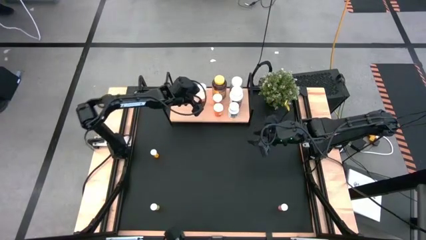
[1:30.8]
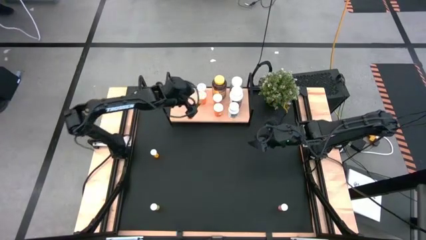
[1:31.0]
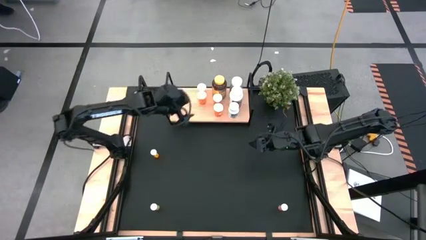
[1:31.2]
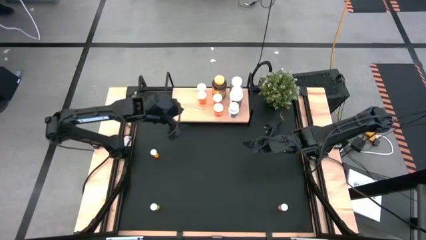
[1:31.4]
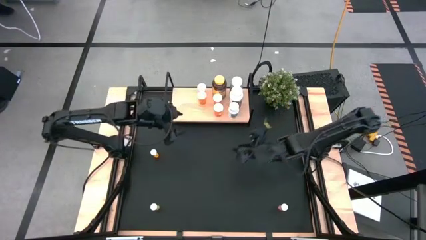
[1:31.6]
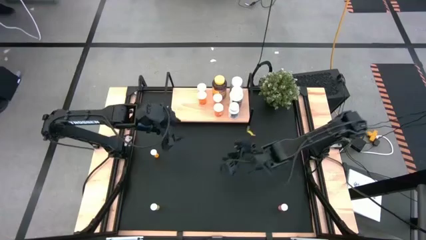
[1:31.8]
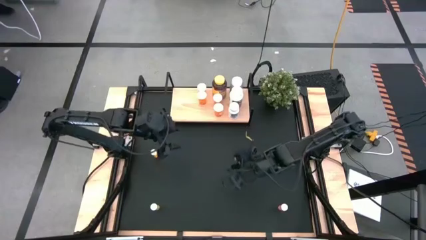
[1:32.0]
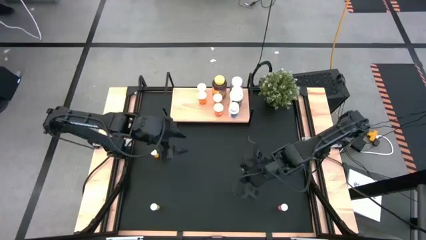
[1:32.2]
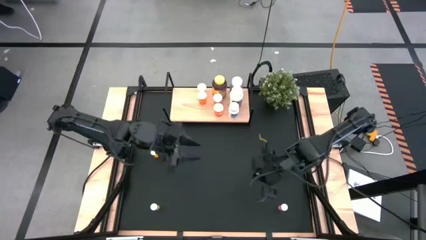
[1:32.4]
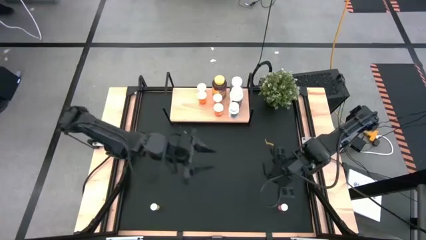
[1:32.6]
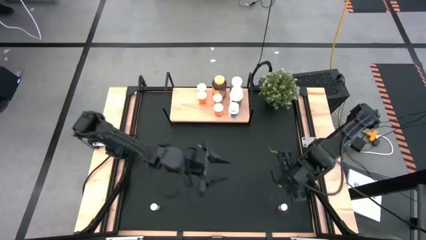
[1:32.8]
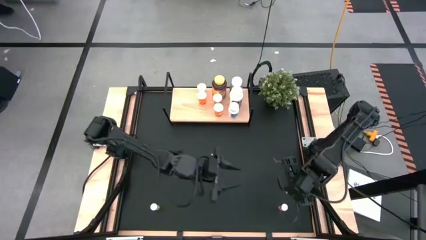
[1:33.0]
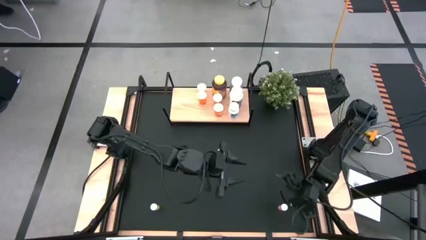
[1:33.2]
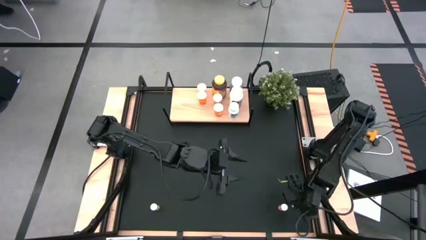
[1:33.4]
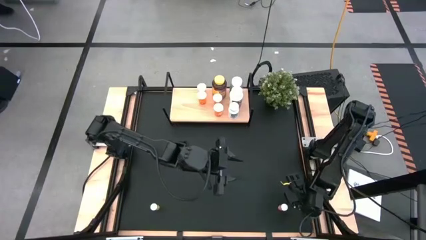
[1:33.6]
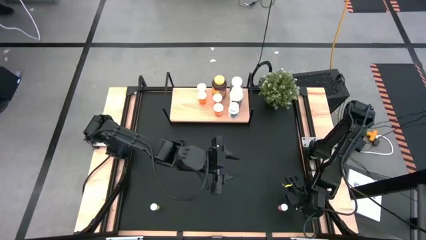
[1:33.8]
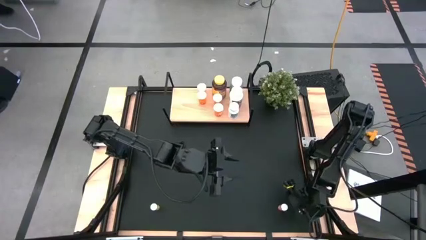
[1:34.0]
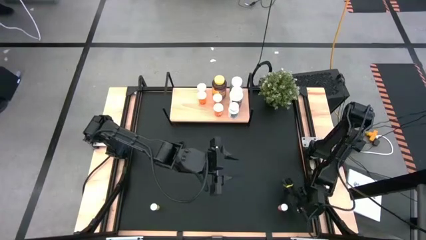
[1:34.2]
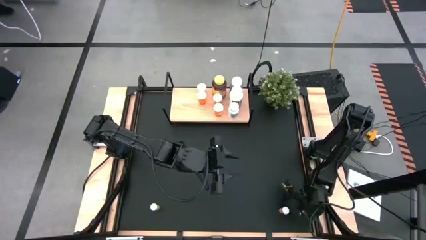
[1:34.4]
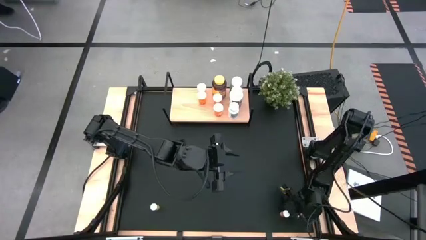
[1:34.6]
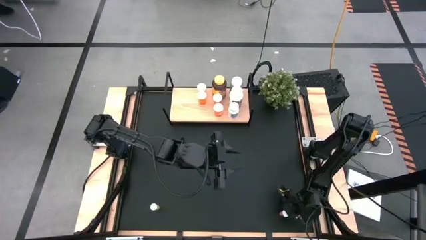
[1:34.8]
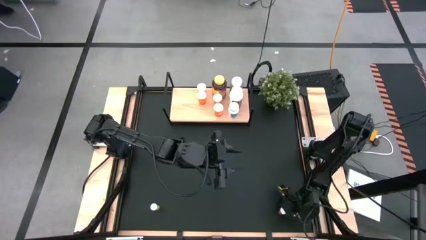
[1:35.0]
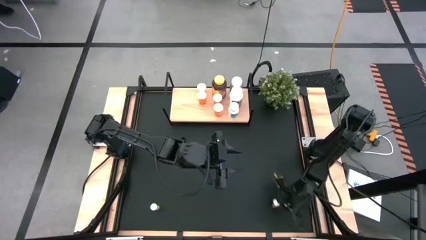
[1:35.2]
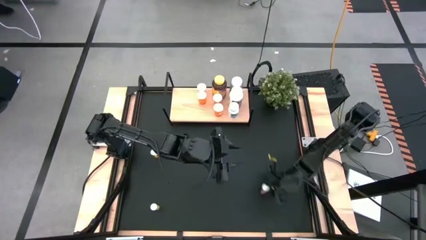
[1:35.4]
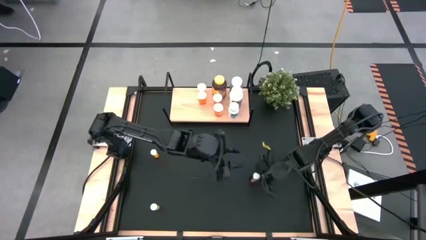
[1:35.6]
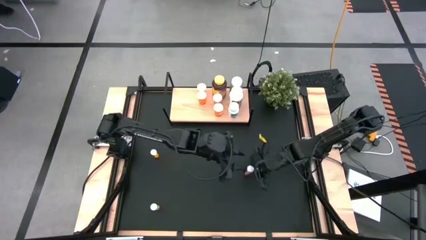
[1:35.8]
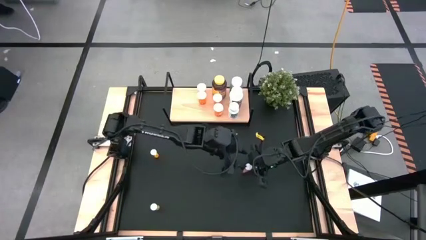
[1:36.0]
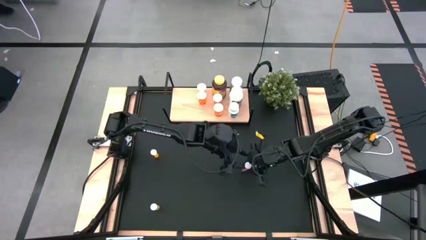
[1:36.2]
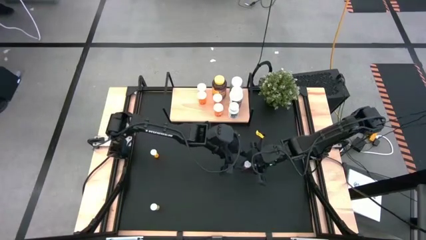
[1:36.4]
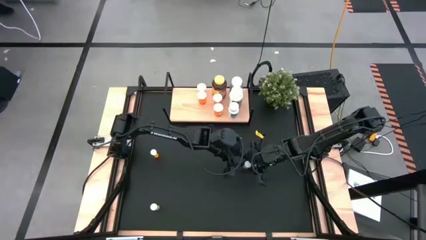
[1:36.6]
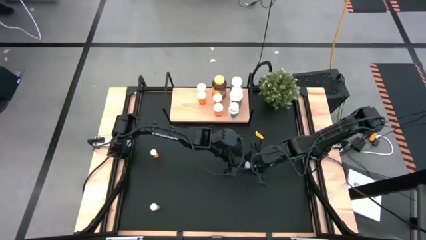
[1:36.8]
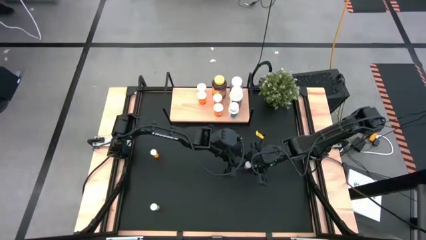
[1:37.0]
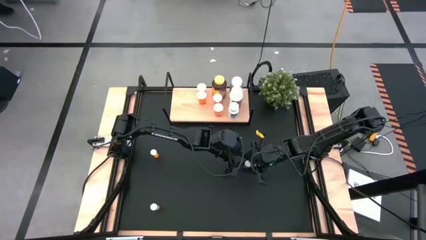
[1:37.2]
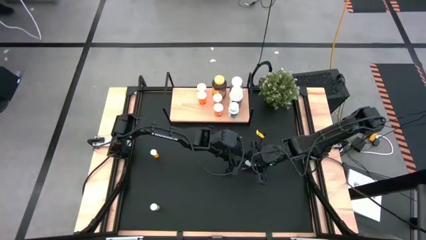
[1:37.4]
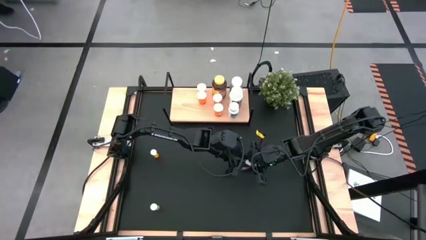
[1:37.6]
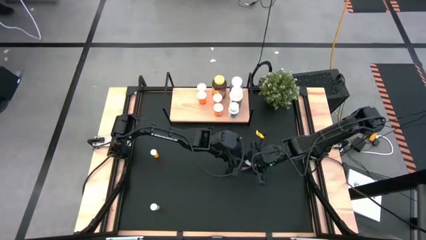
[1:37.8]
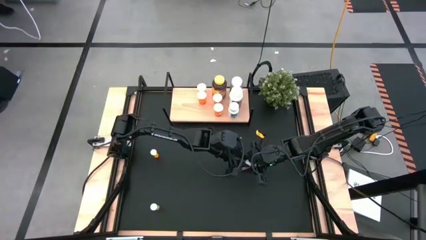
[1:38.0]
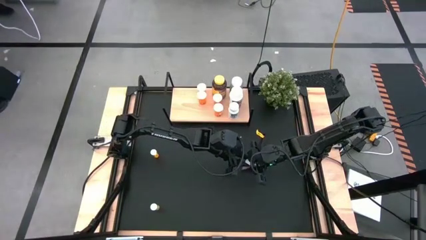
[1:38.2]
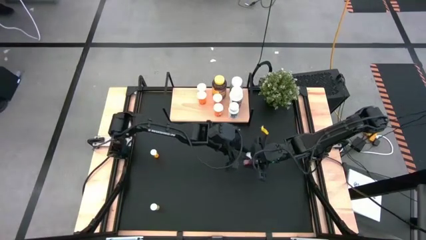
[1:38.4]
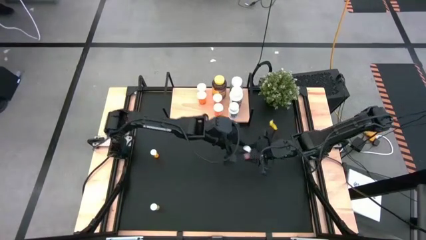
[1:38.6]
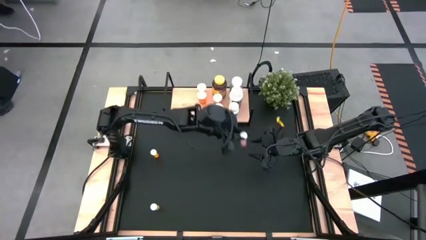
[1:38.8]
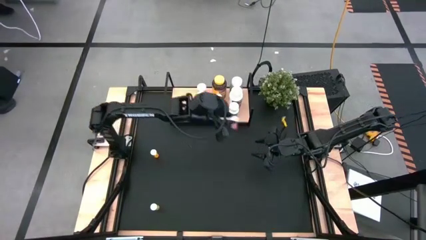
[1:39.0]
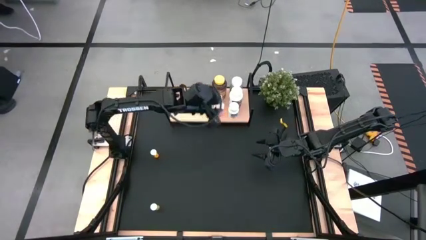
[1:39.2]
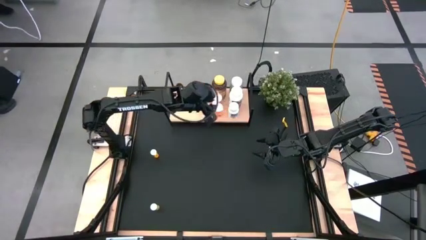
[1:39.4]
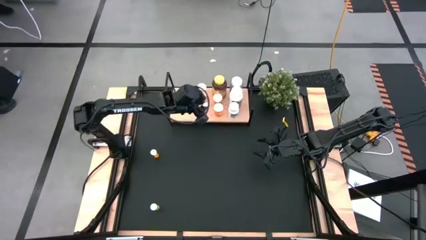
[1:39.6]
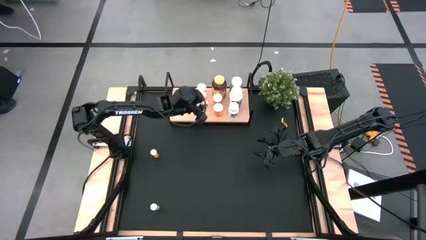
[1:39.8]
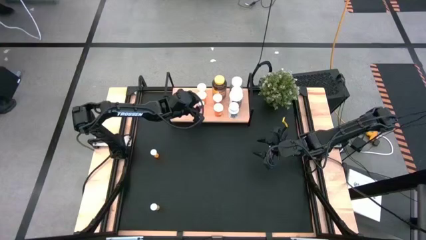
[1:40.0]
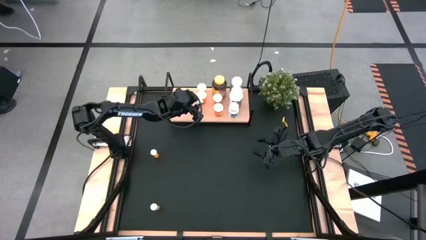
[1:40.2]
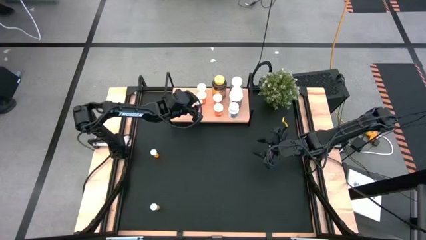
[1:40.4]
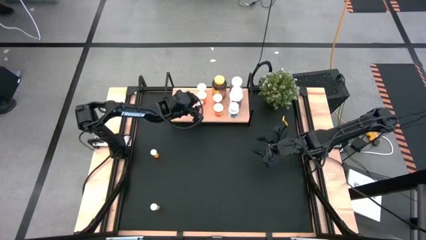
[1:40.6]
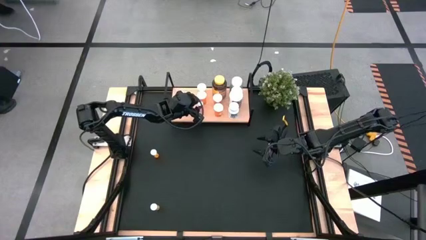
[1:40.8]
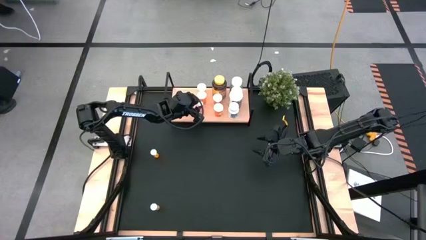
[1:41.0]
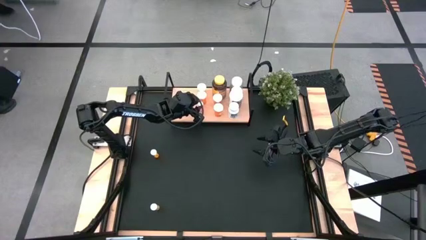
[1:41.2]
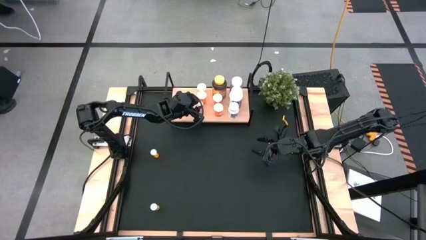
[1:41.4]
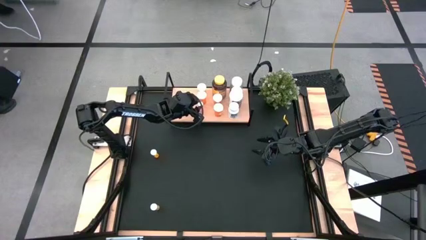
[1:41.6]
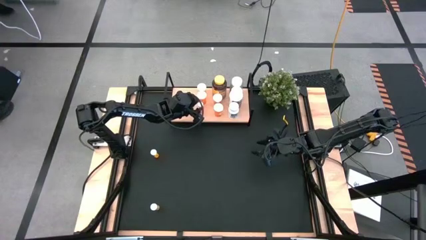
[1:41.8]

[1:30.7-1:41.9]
Task: Pick and place medicine bottles onto shelf by color
Put the pink pill bottle on the shelf aligned with the other pink pill bottles

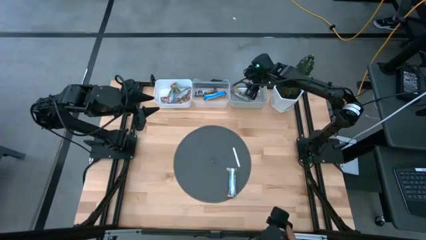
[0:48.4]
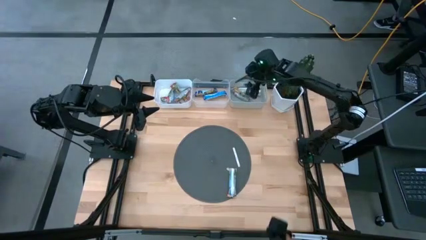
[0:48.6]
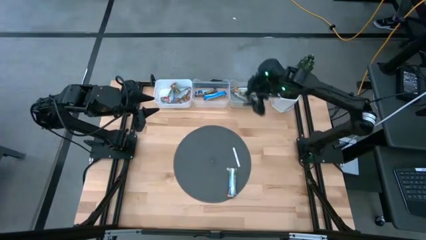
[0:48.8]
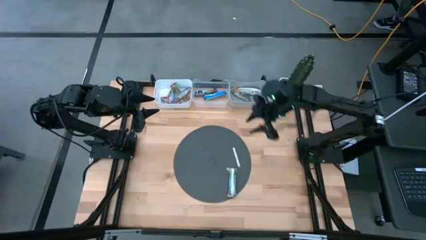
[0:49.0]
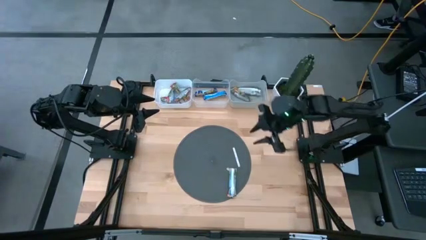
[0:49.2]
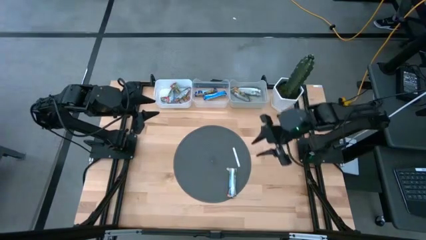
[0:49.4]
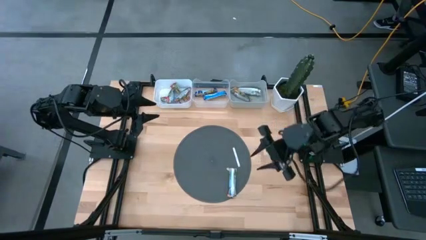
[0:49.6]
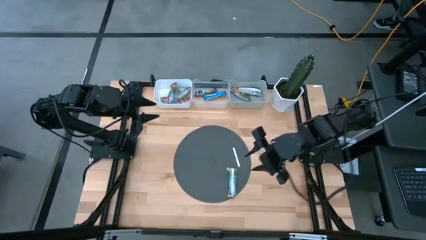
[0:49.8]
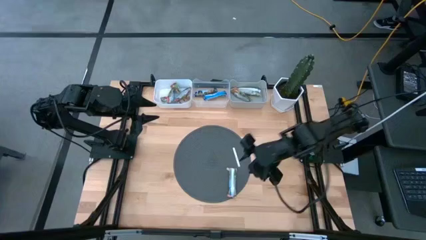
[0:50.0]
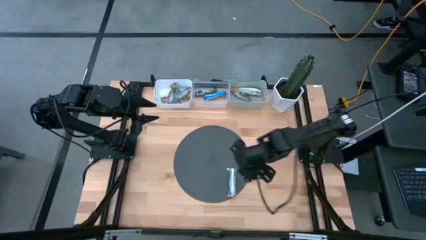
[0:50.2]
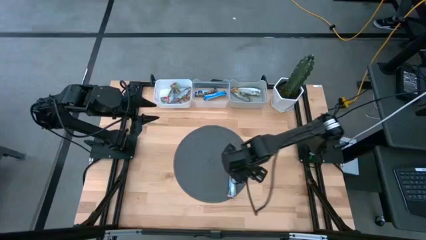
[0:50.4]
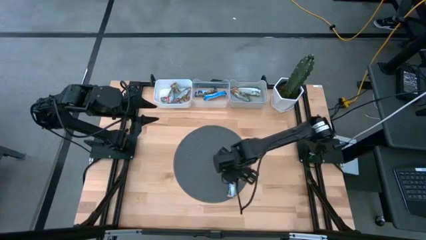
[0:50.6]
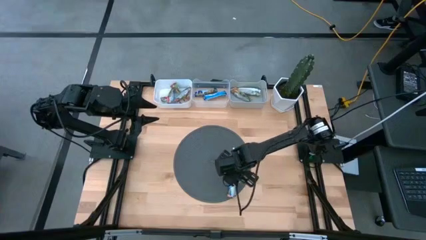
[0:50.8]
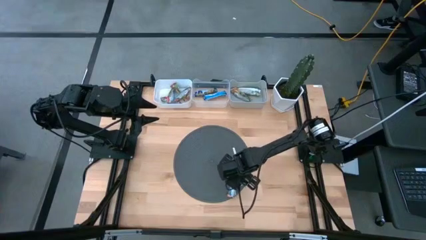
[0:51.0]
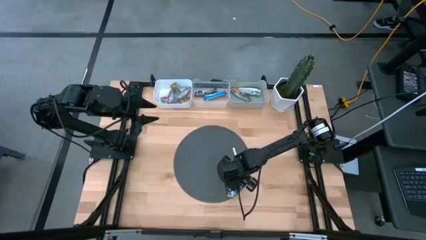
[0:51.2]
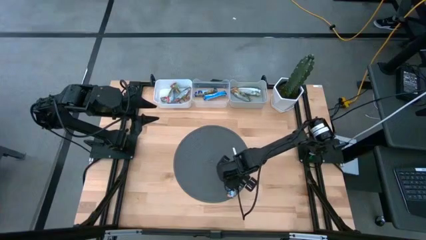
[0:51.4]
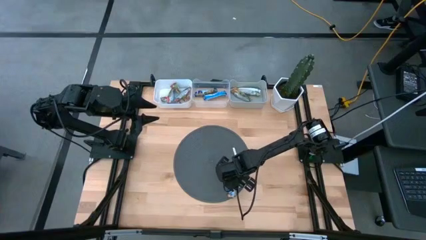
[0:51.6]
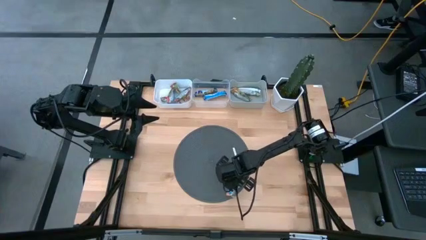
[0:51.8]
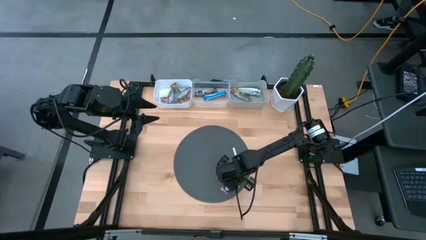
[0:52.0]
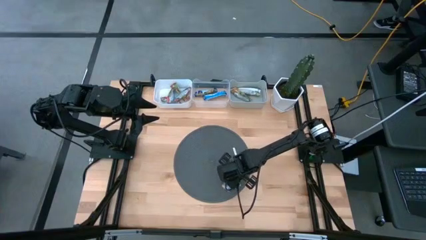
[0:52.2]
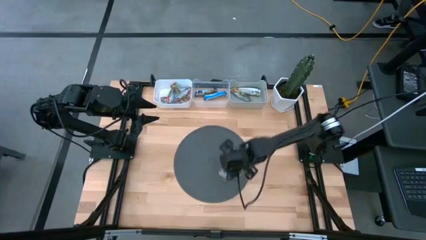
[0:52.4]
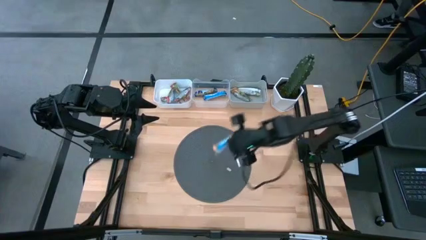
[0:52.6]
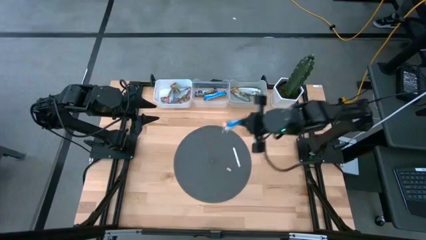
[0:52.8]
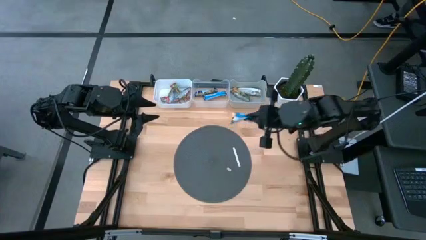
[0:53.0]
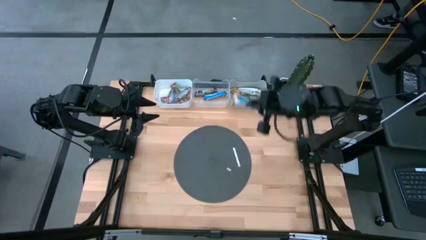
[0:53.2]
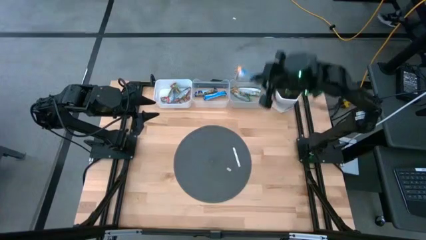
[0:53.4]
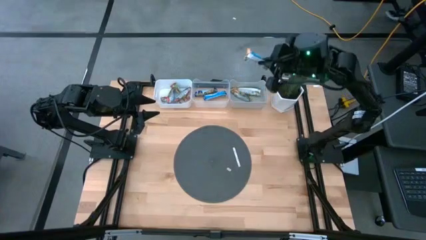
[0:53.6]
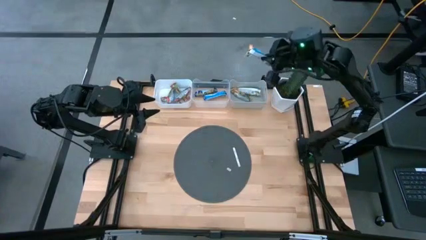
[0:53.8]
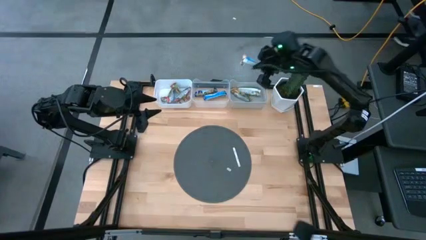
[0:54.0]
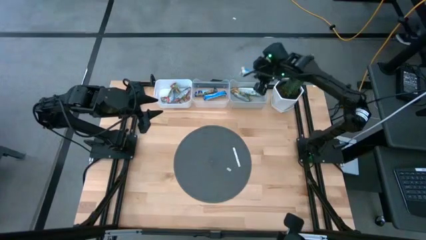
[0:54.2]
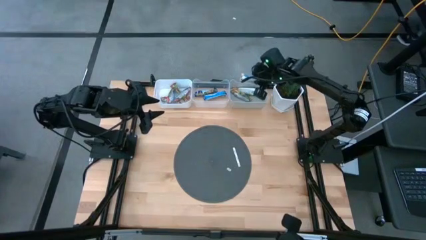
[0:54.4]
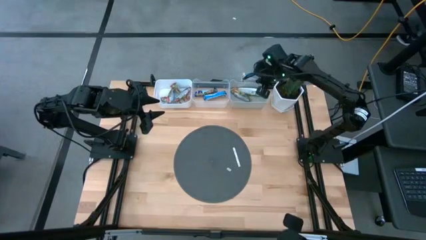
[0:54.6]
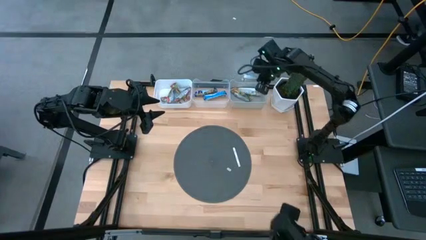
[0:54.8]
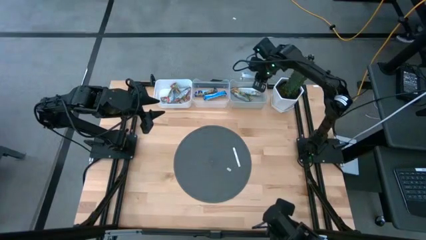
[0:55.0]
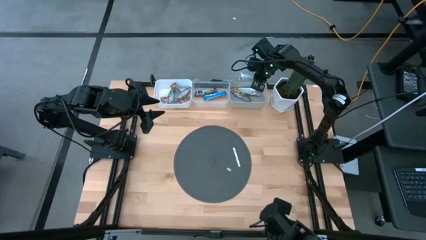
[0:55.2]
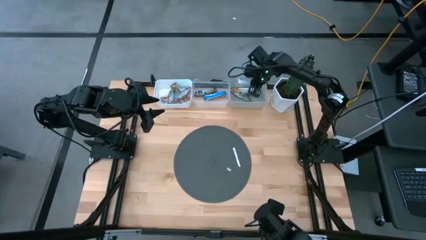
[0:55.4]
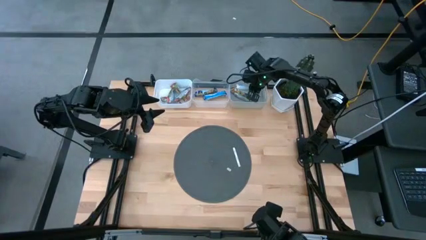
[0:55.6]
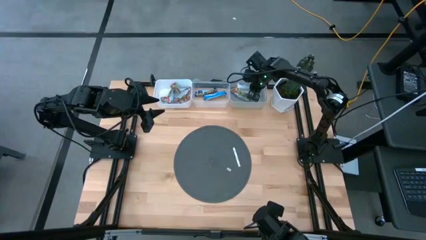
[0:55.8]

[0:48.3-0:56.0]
Task: Pick and place Granola Bars by type
Put the orange granola bar into the gray bin
